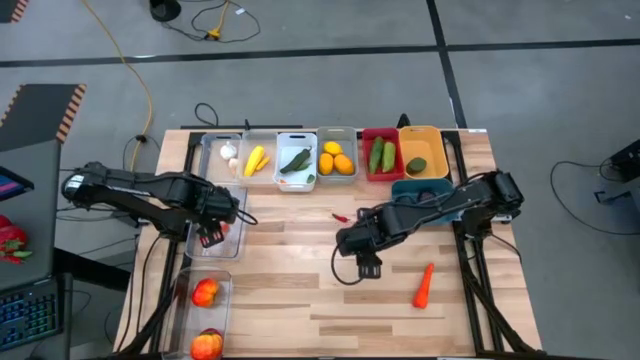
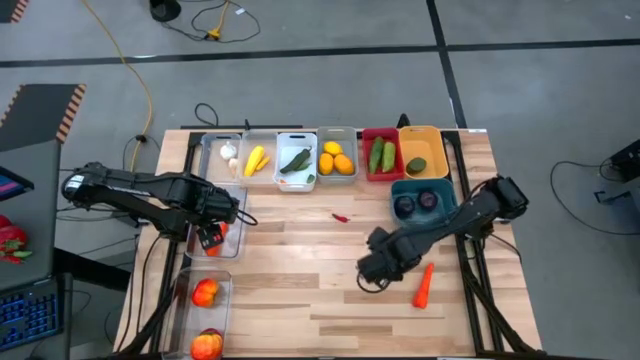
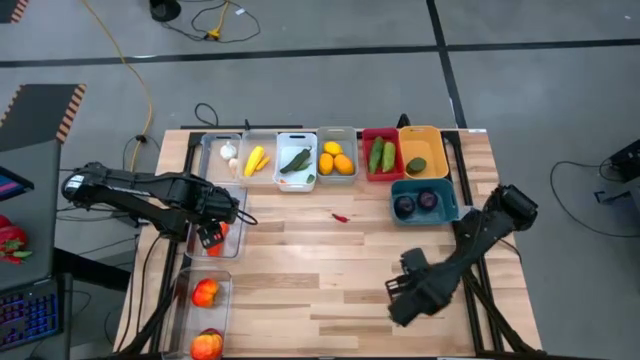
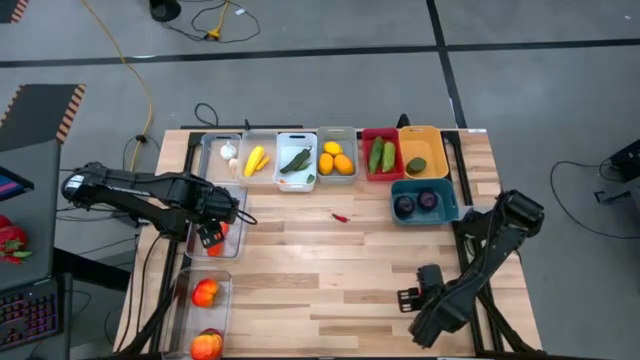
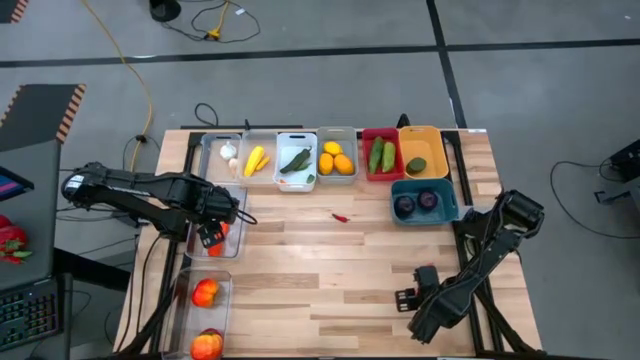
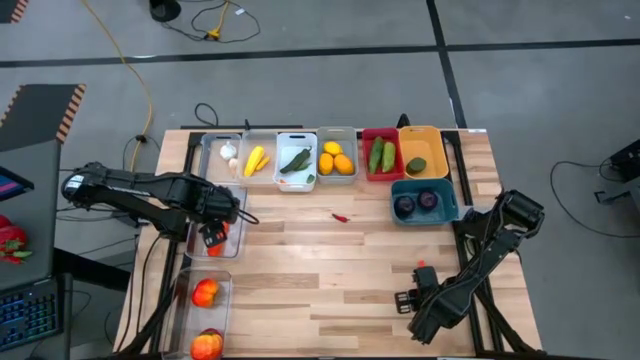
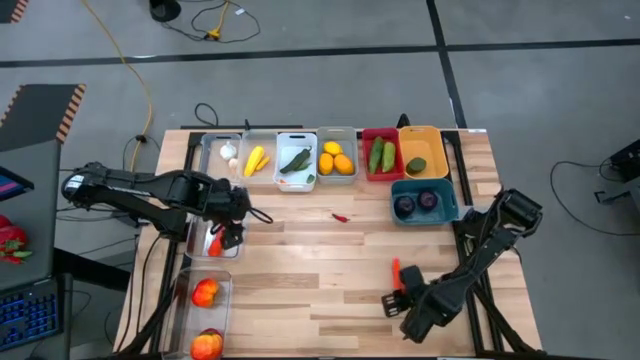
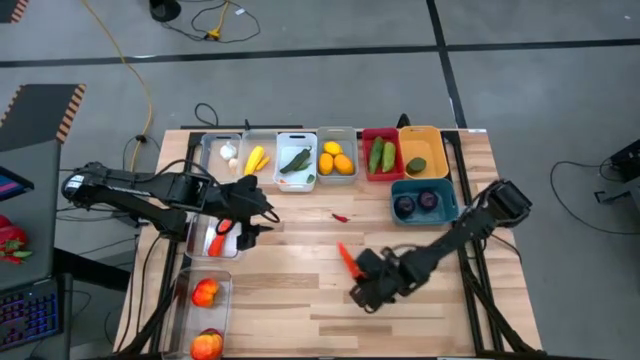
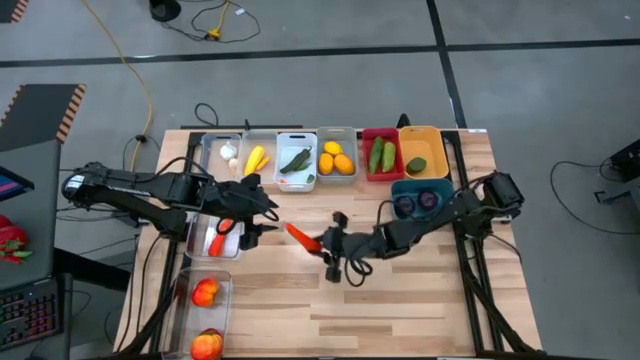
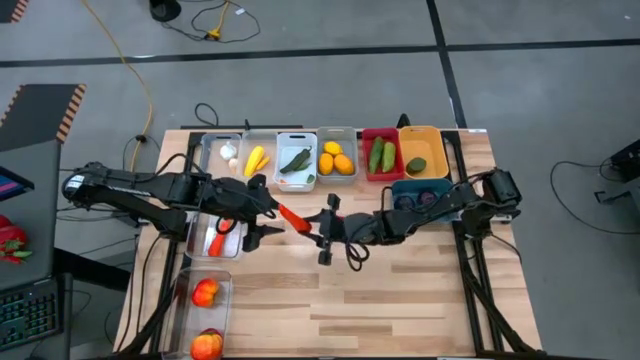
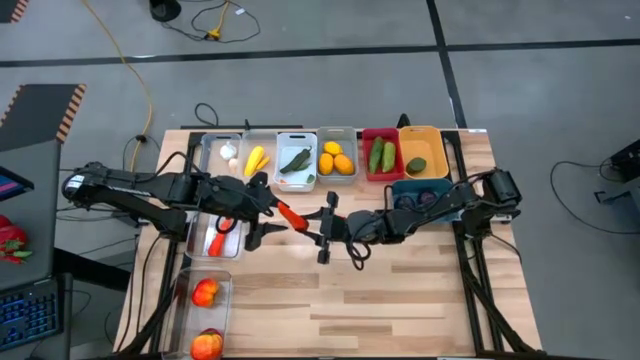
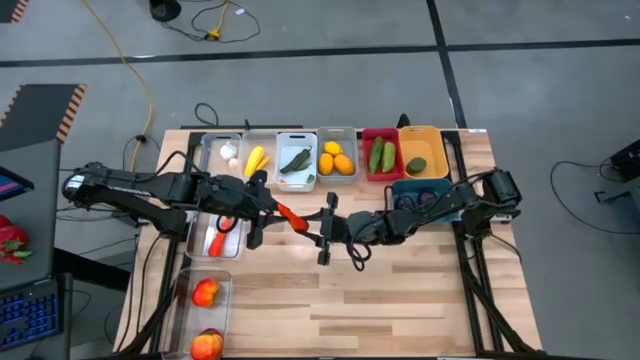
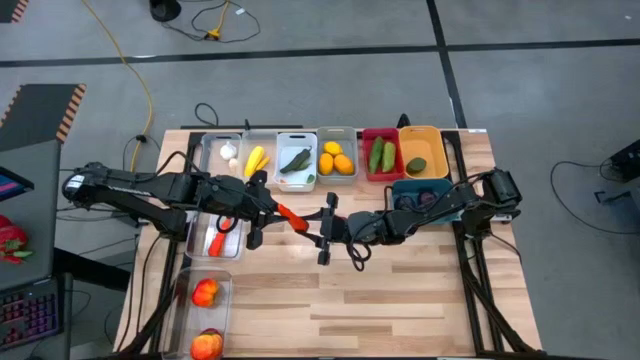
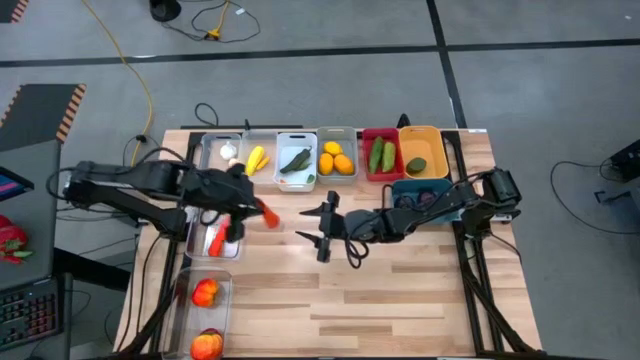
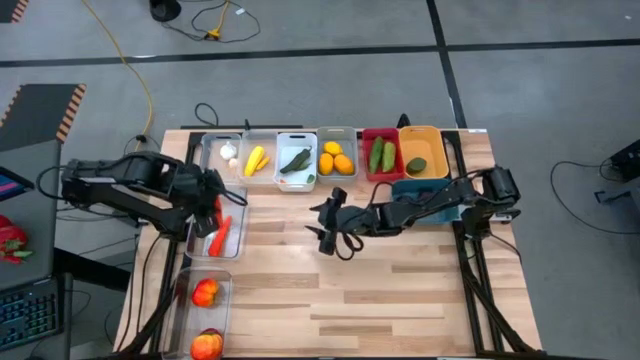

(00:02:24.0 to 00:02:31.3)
Task: Sort produce into baskets
Put the carrot into the top big transparent bin

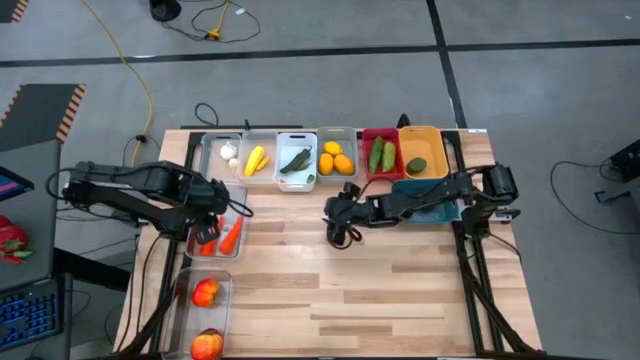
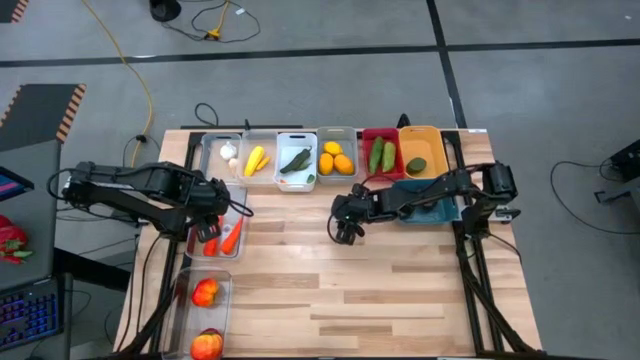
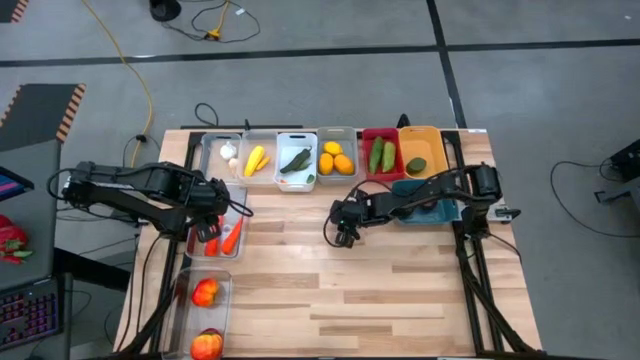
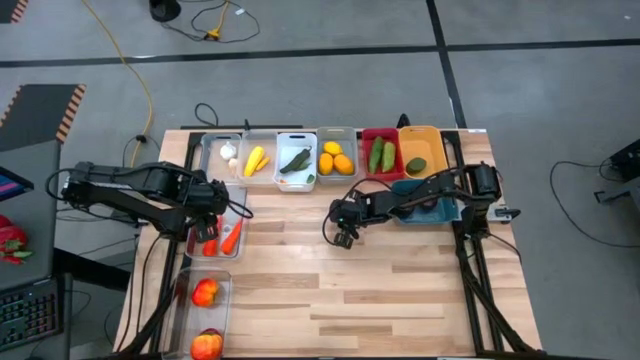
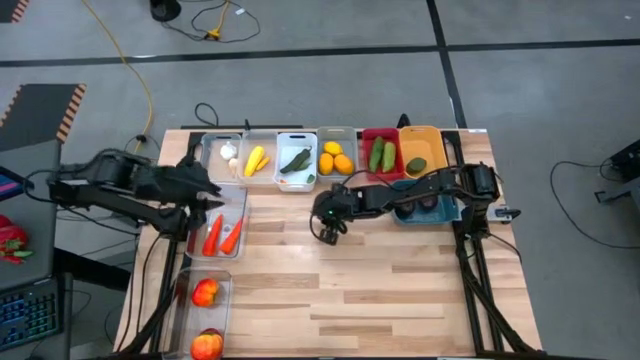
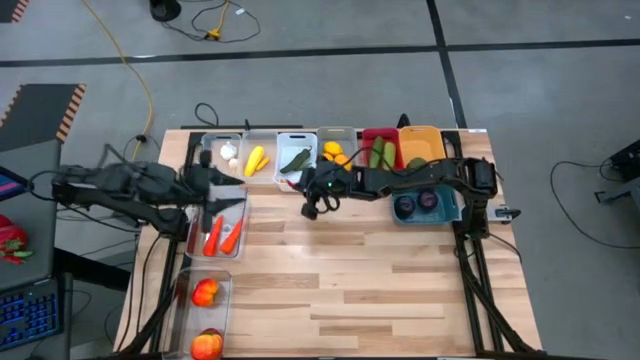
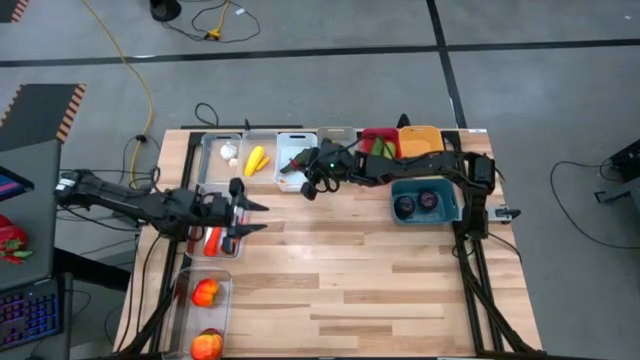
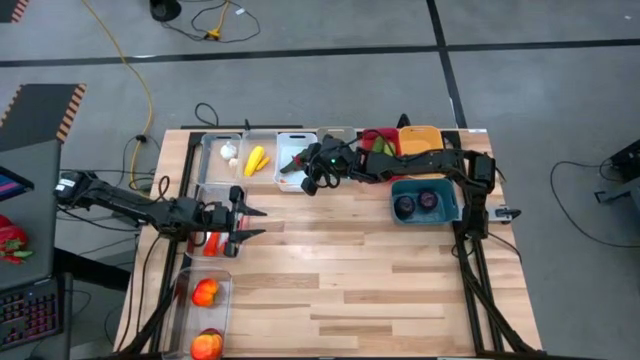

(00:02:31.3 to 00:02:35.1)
Put the red chili pepper into the white bin

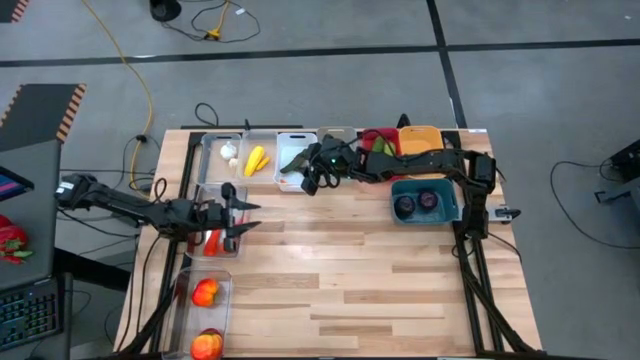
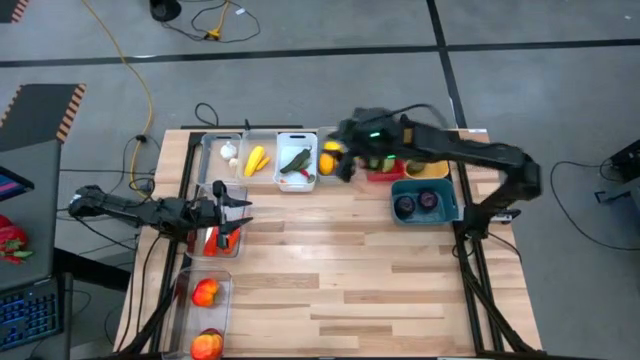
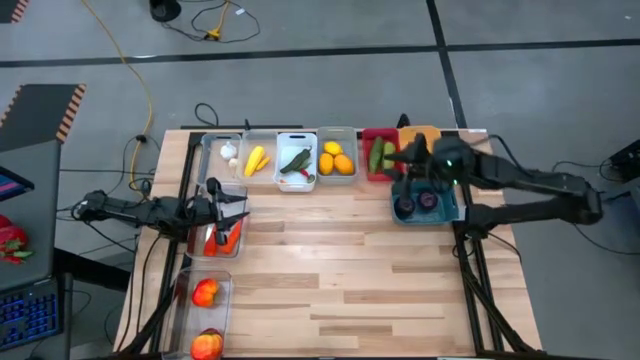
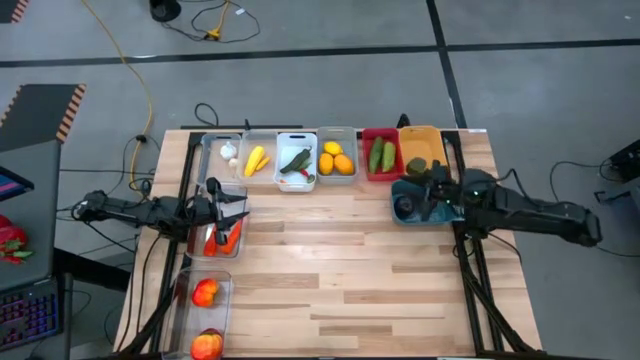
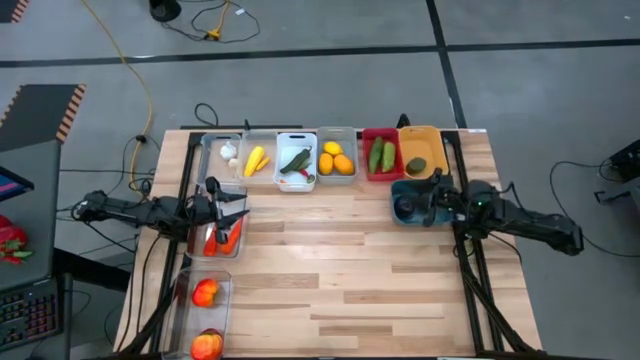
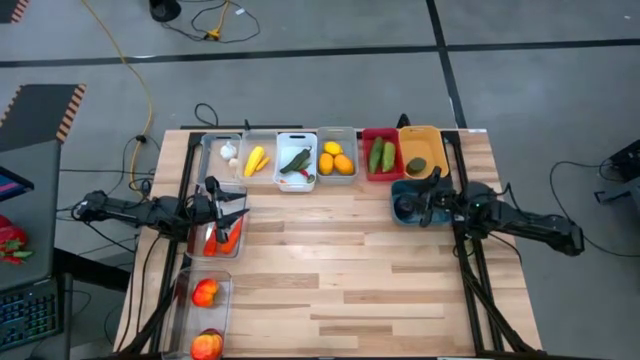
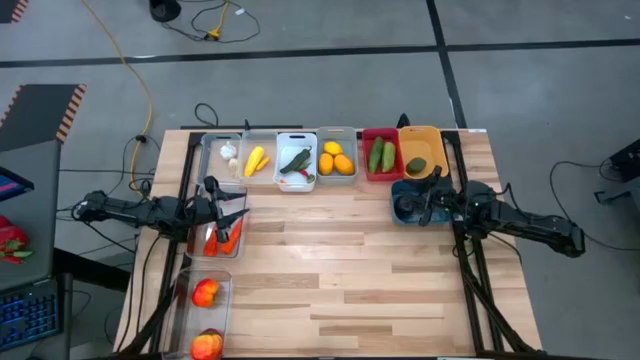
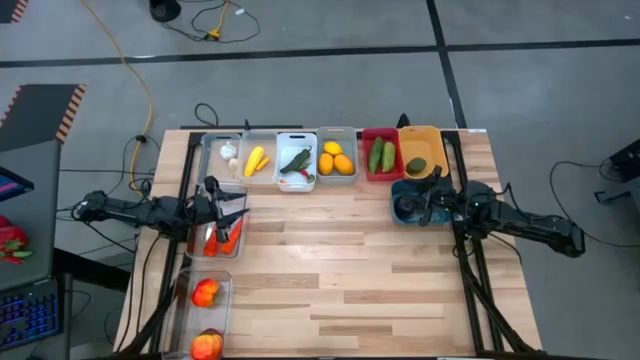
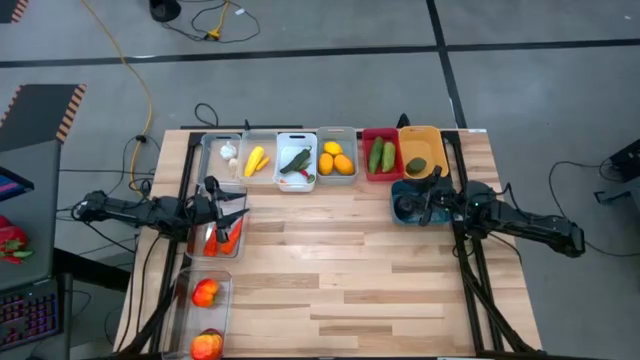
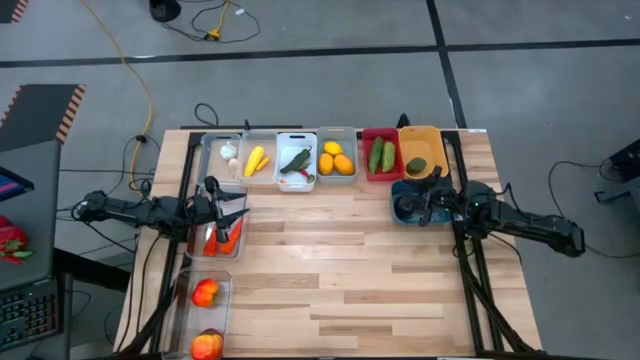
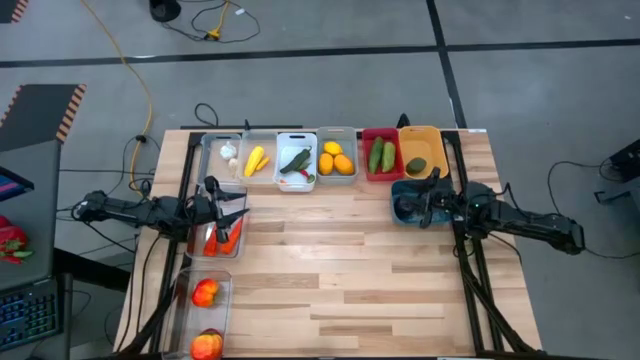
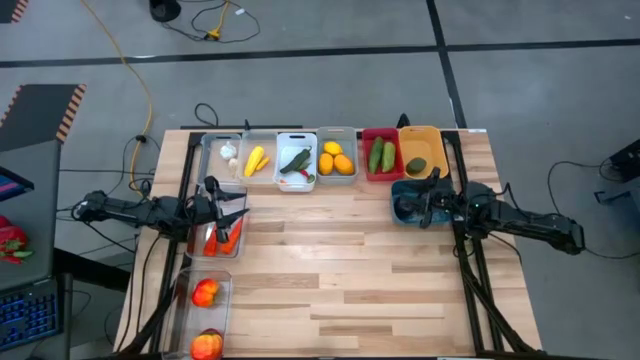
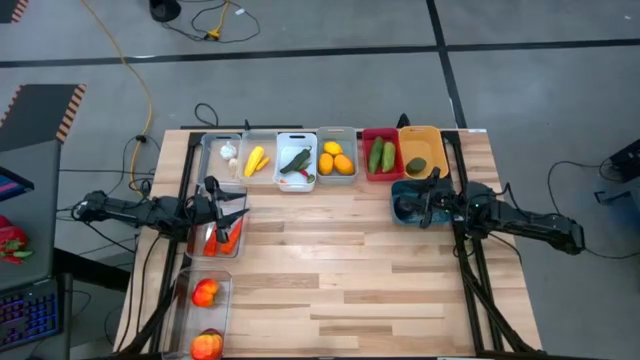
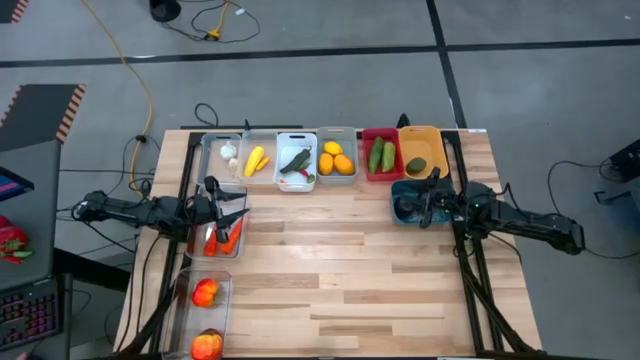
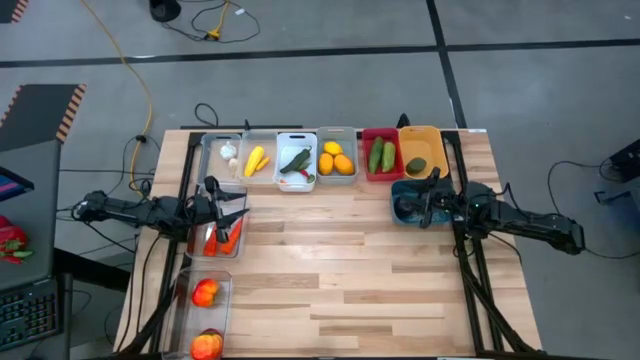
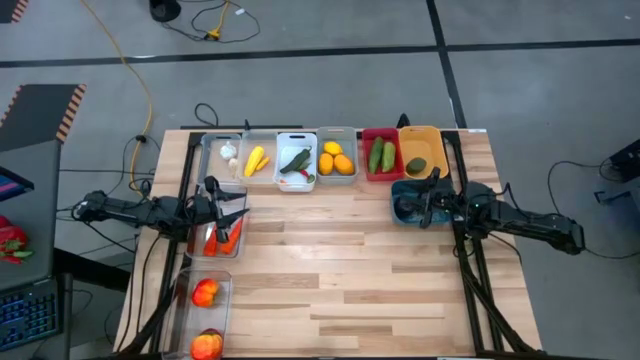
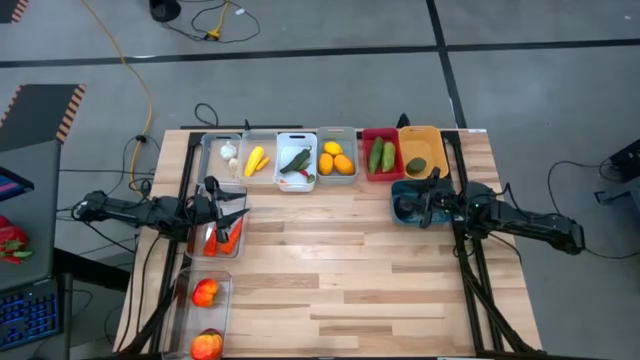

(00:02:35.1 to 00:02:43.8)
Return to Home Position
